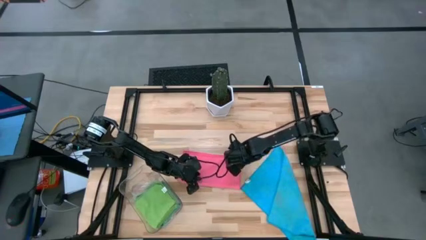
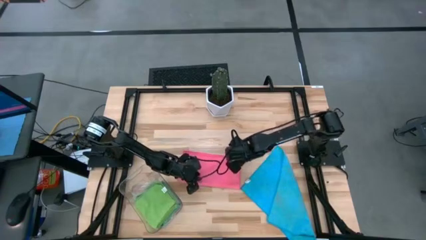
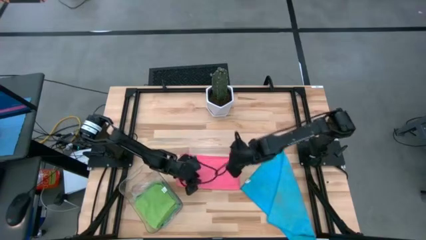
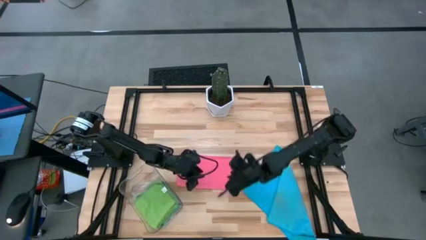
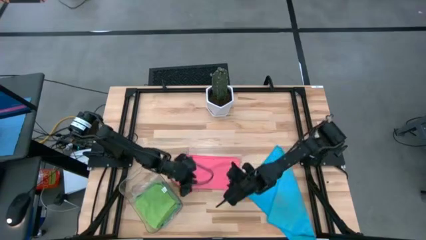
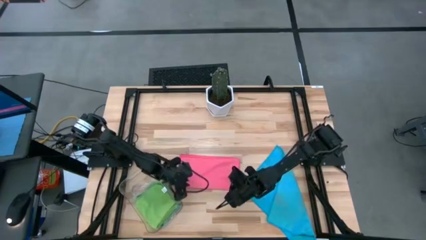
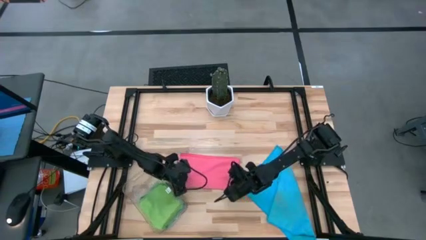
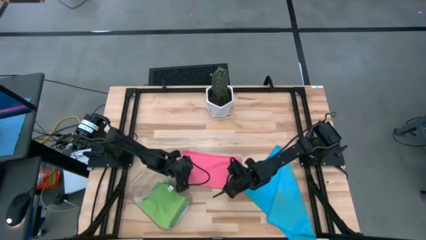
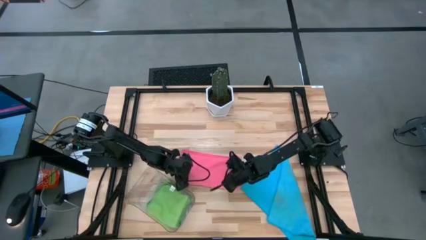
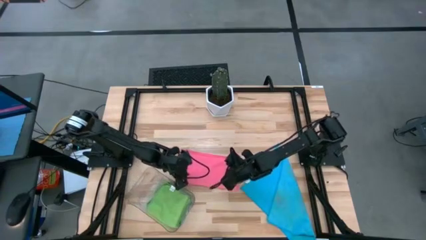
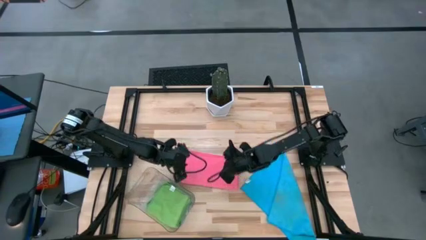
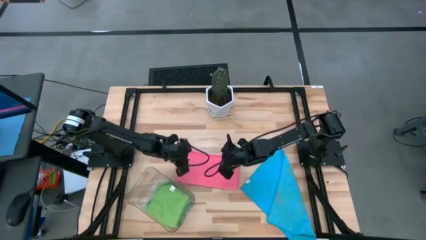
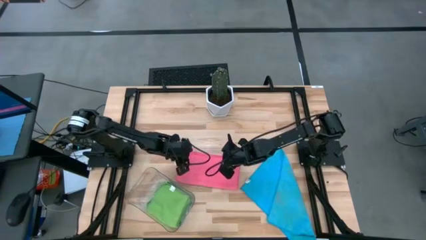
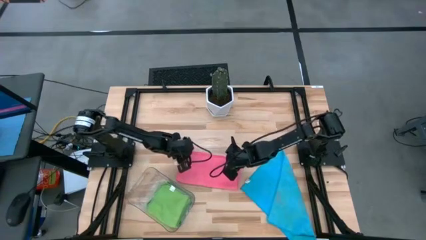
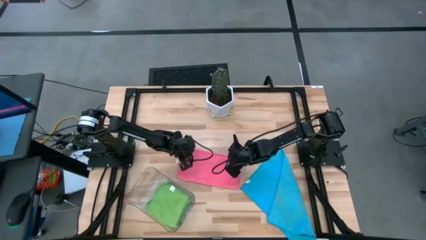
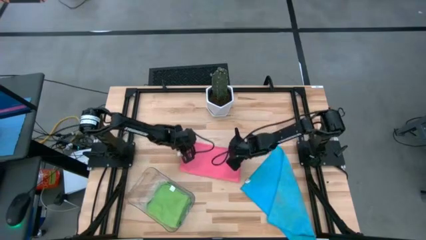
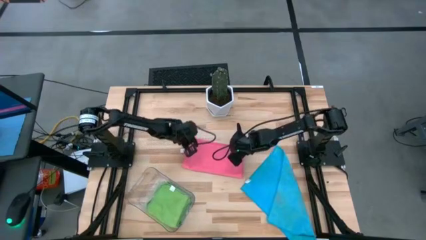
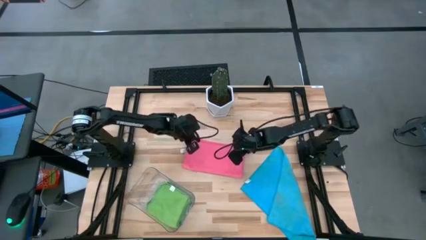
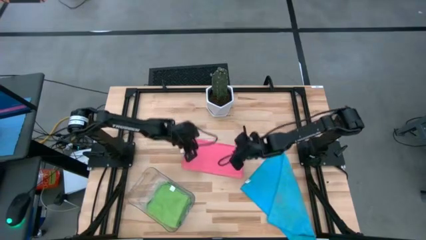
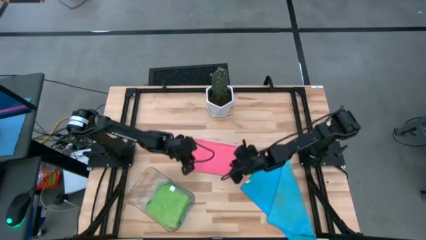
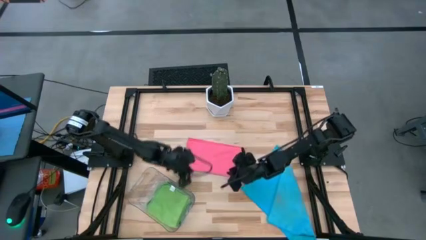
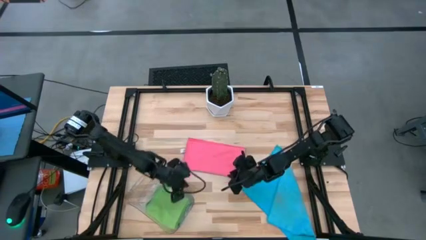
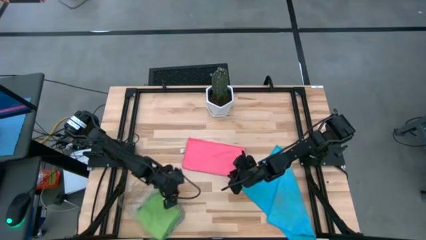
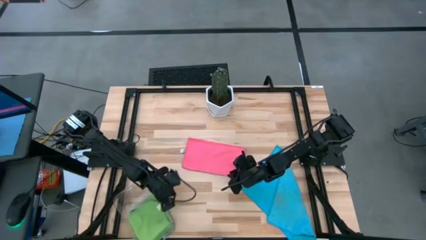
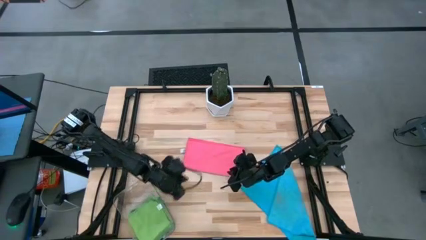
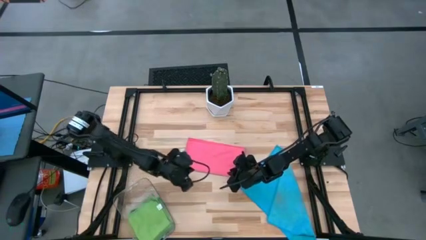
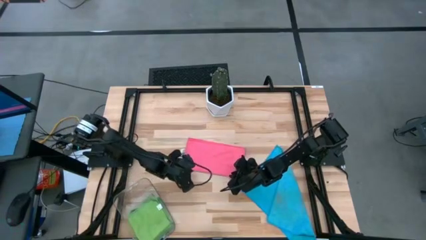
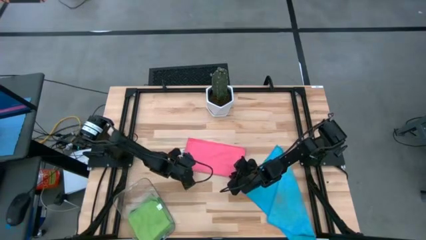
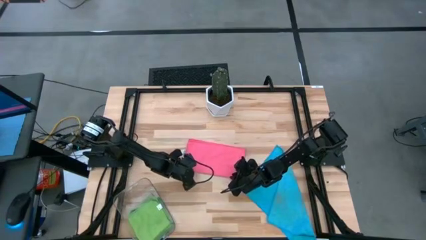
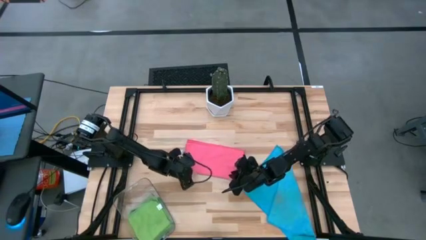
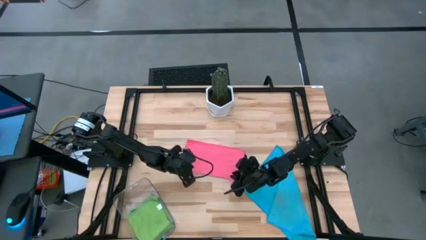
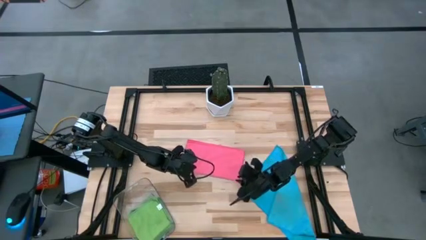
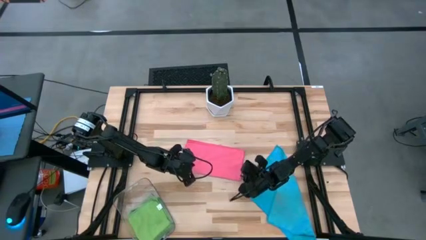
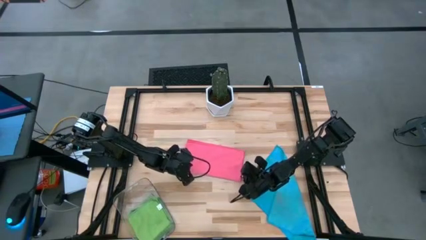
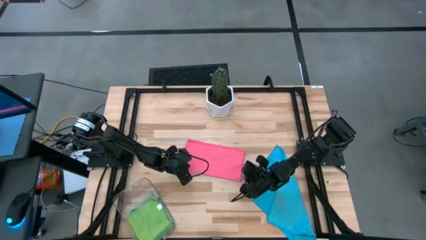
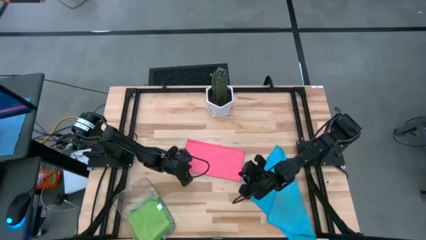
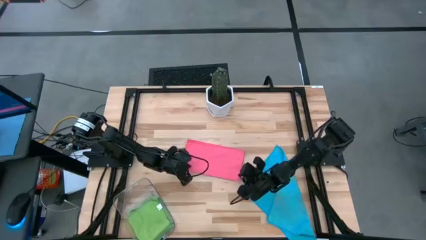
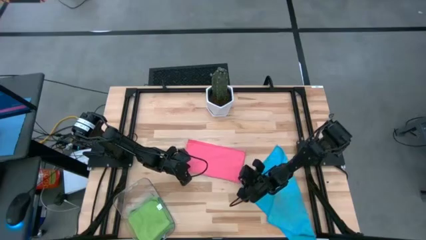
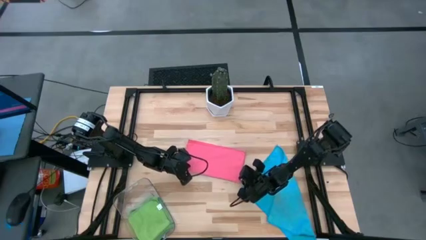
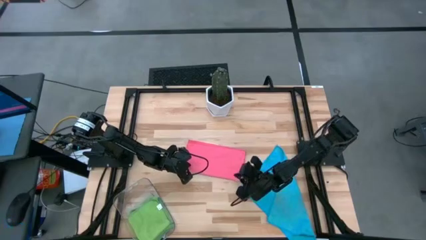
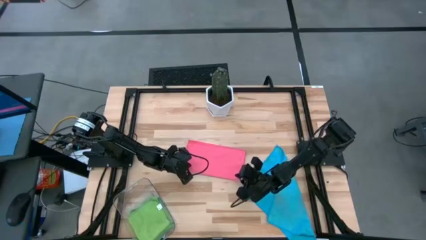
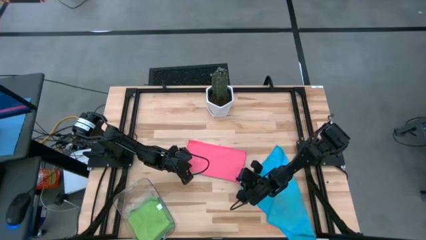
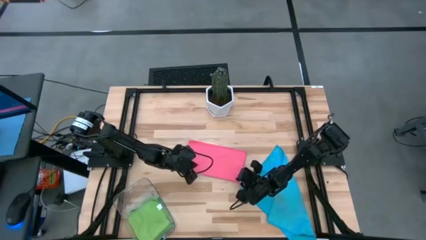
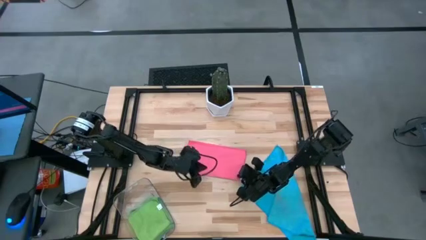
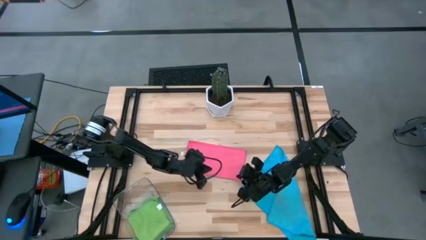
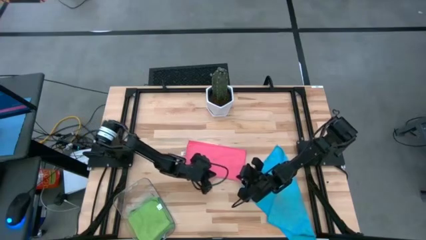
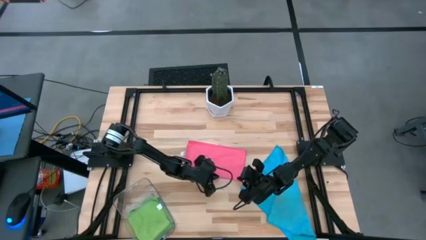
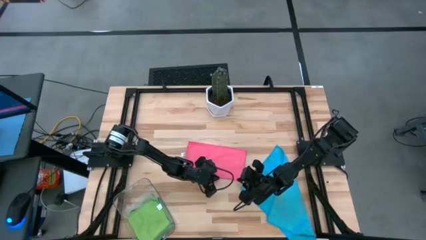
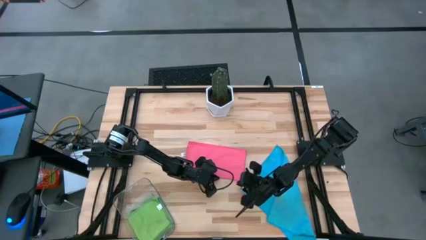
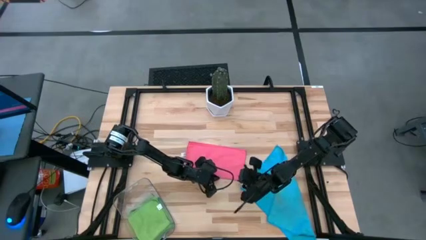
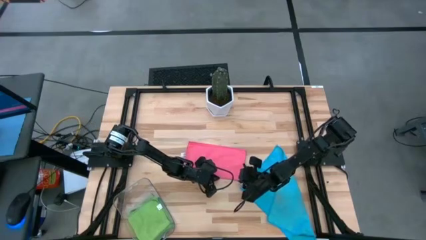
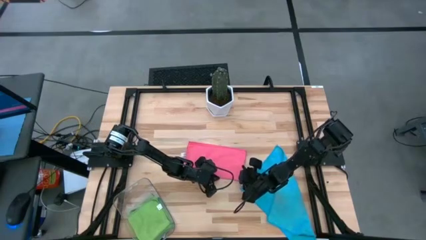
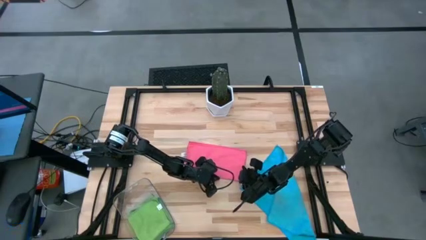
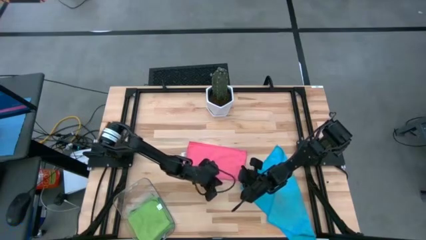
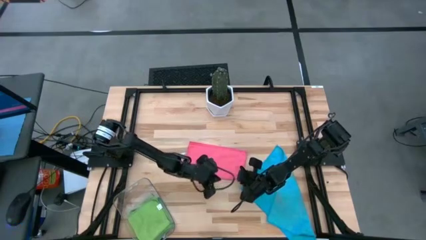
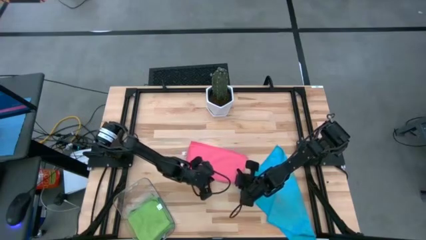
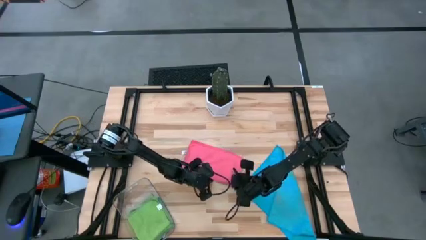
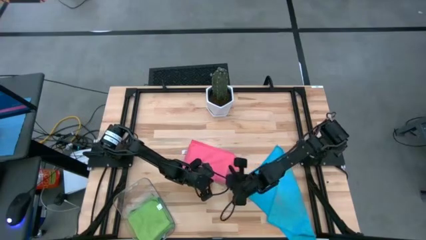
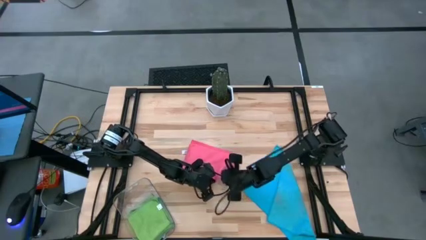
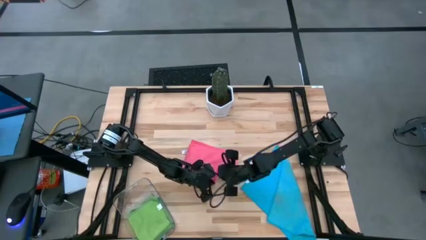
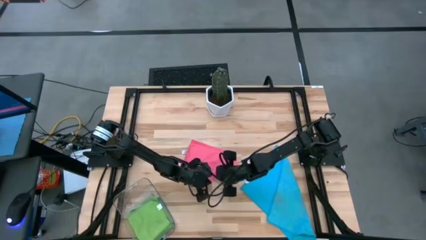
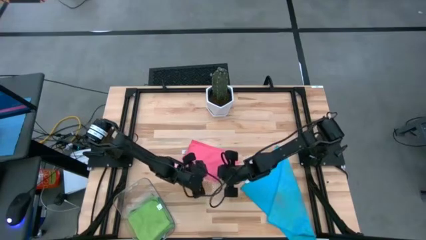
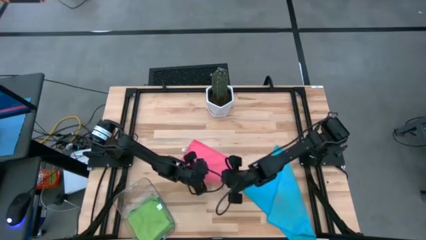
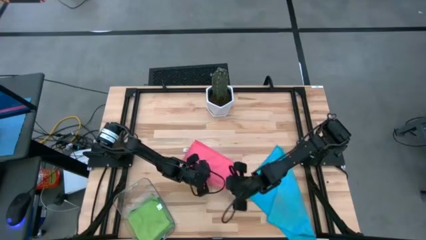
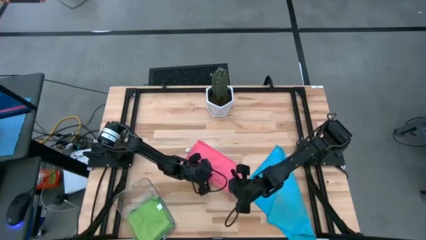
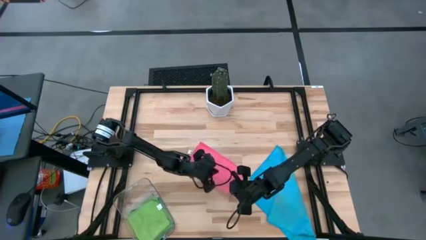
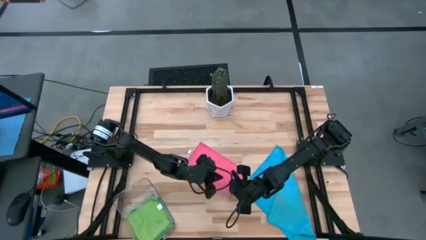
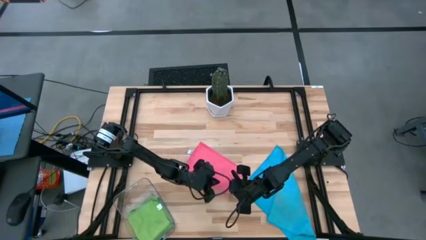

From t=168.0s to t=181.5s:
Task: Fold microfiber towels
Fold the pink microfiber cloth

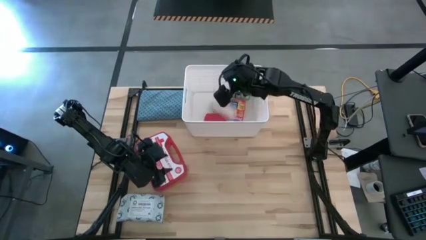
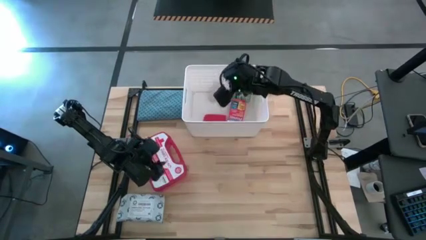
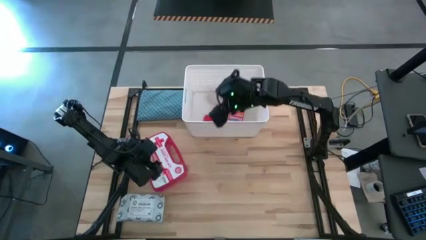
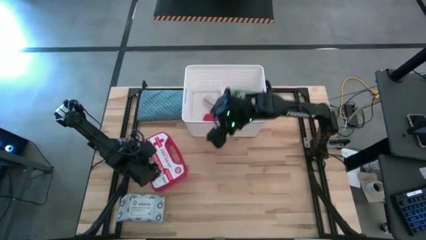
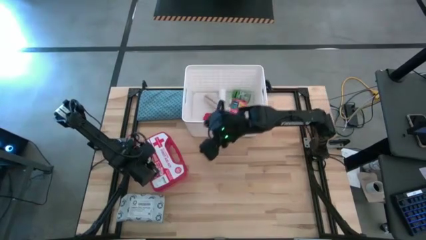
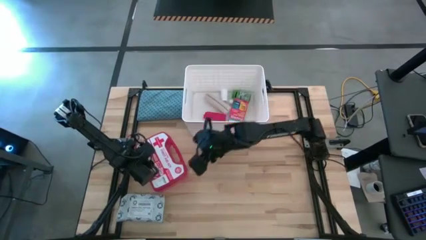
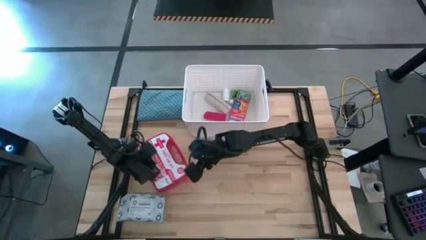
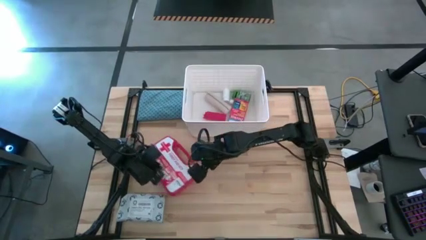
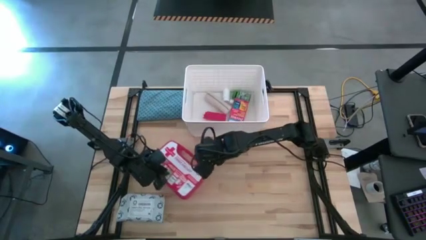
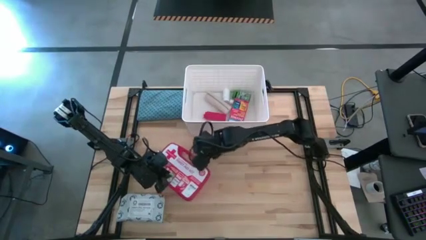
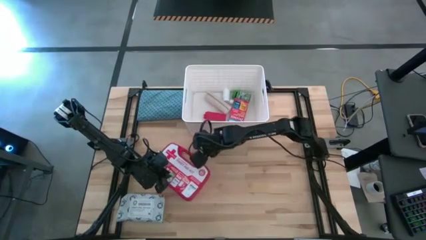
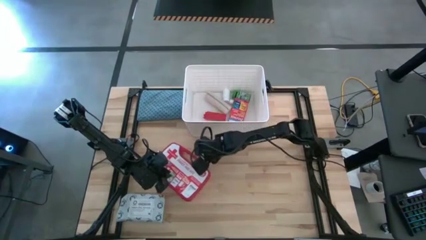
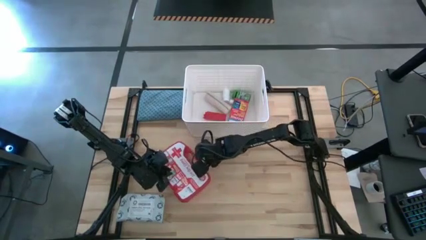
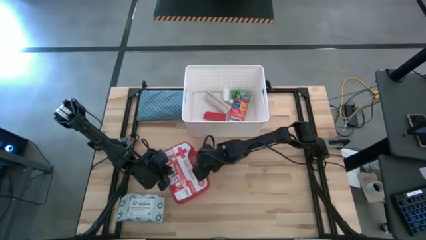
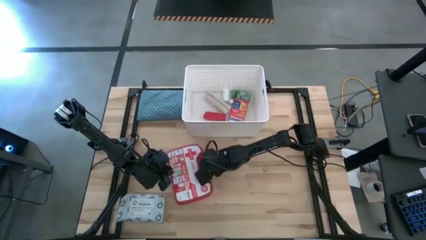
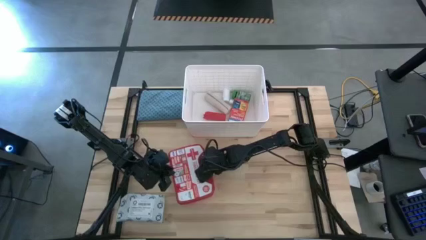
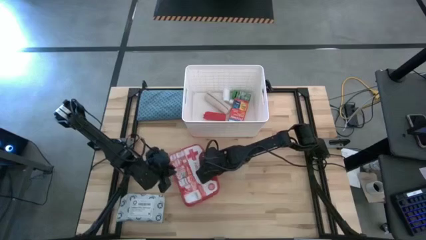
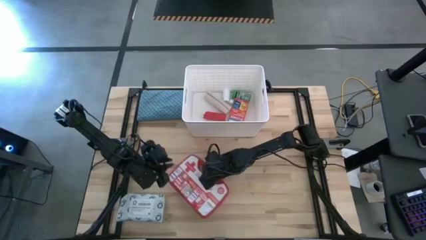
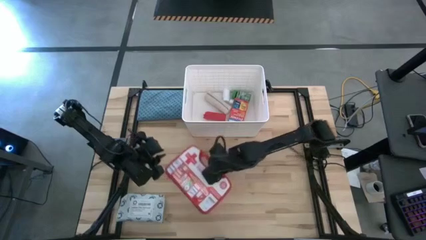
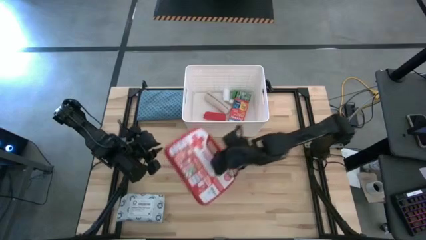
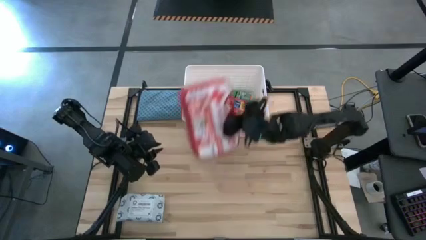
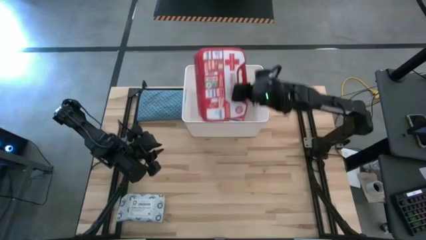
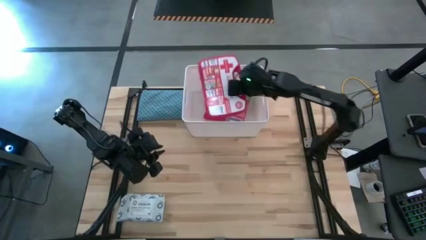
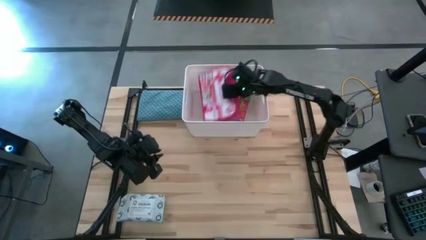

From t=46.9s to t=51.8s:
Task: Pick & place medical supplies in basket/bin
Put the red medicine kit in the white bin
